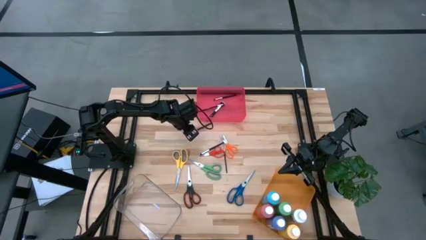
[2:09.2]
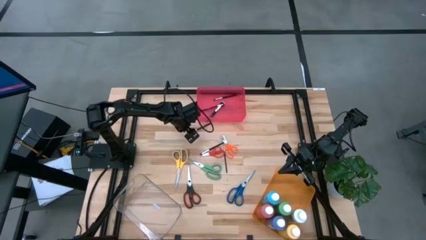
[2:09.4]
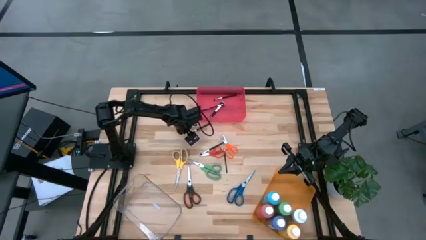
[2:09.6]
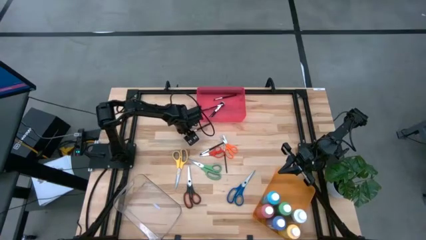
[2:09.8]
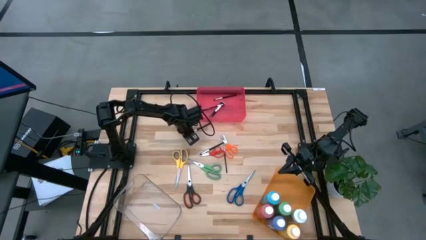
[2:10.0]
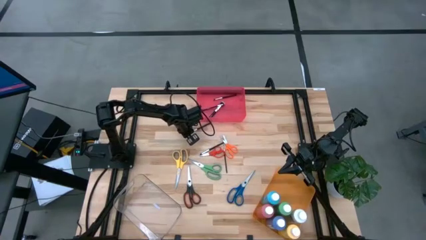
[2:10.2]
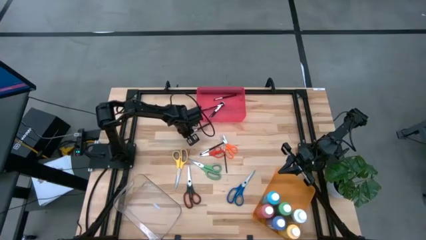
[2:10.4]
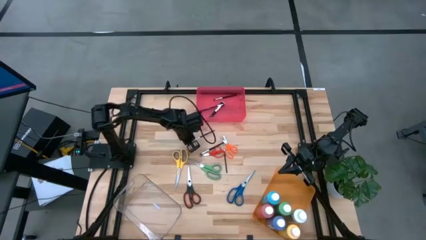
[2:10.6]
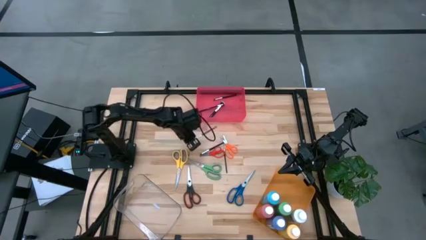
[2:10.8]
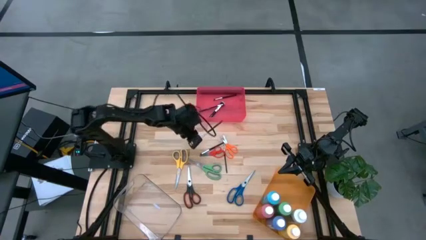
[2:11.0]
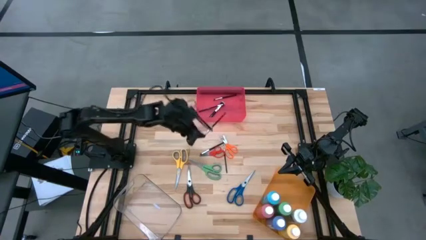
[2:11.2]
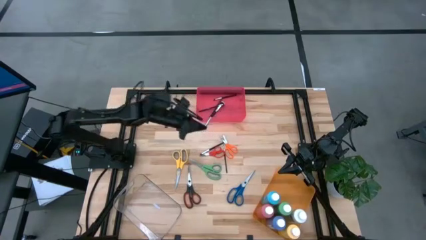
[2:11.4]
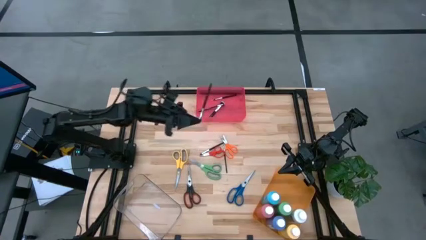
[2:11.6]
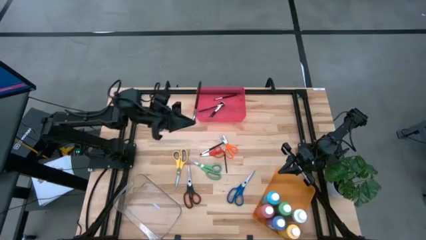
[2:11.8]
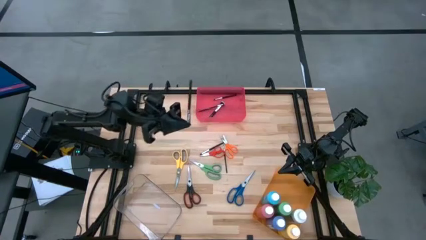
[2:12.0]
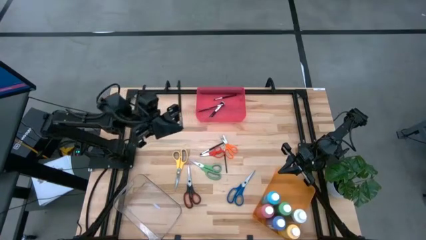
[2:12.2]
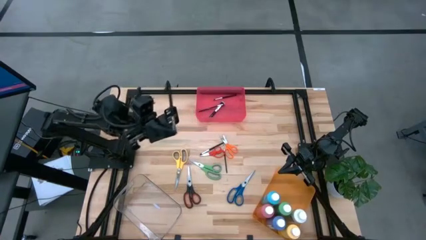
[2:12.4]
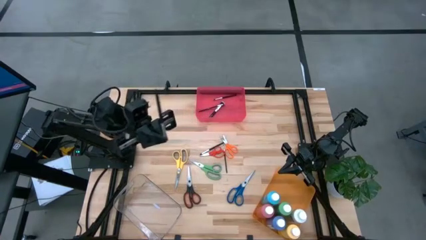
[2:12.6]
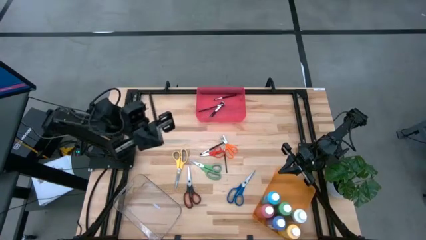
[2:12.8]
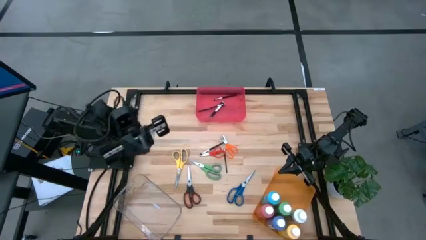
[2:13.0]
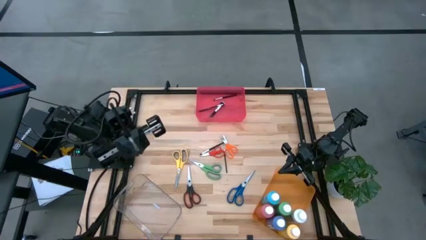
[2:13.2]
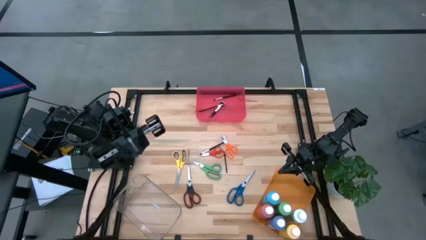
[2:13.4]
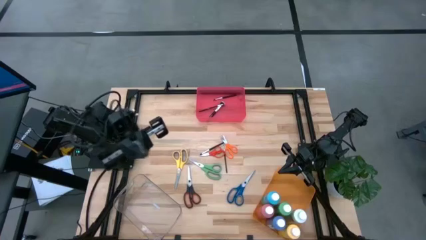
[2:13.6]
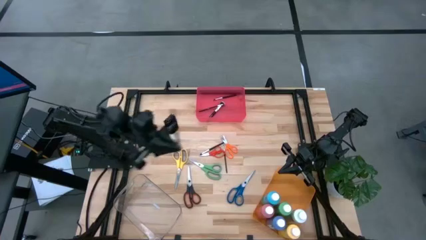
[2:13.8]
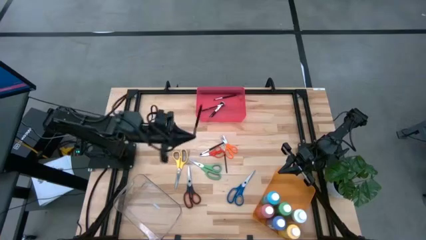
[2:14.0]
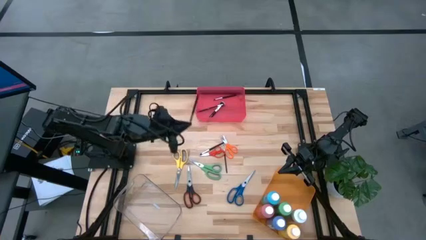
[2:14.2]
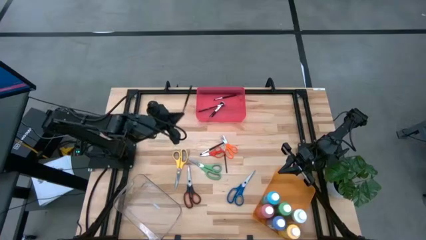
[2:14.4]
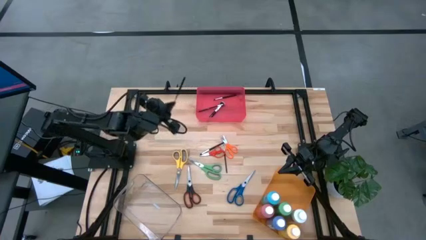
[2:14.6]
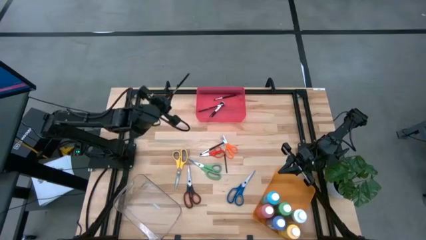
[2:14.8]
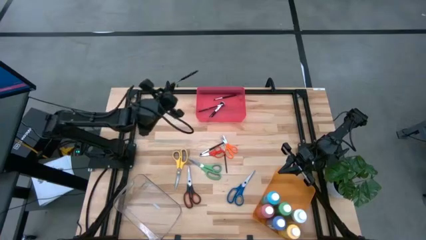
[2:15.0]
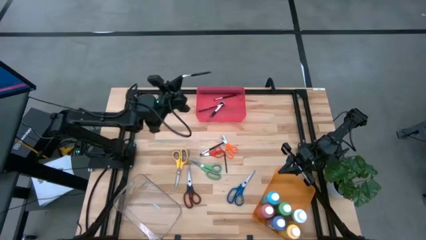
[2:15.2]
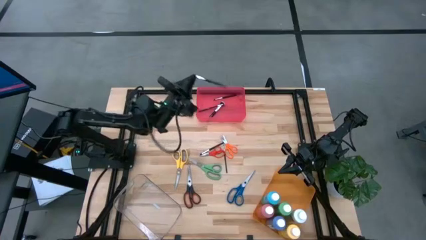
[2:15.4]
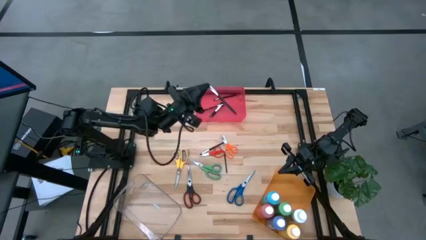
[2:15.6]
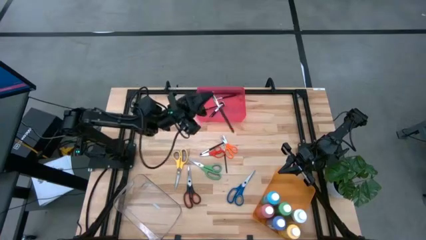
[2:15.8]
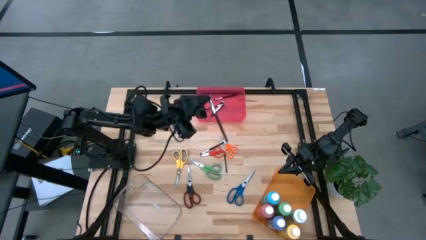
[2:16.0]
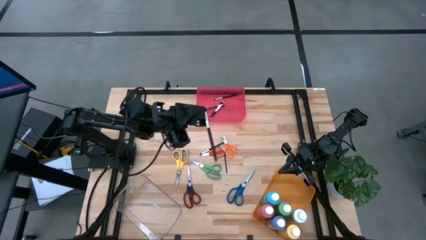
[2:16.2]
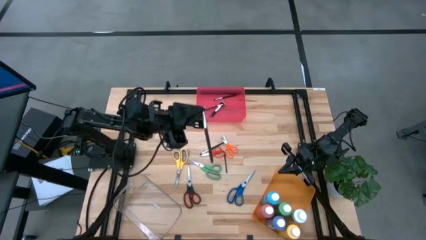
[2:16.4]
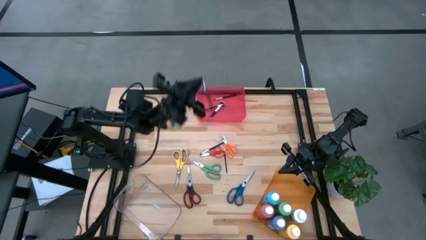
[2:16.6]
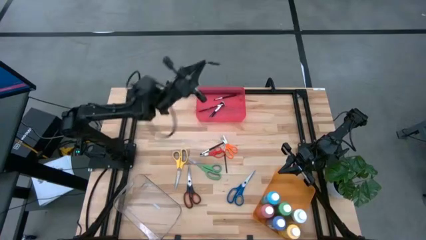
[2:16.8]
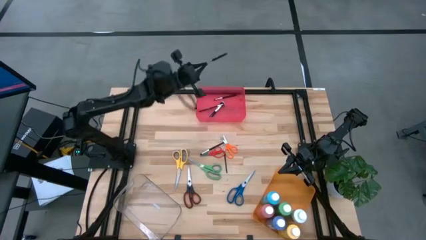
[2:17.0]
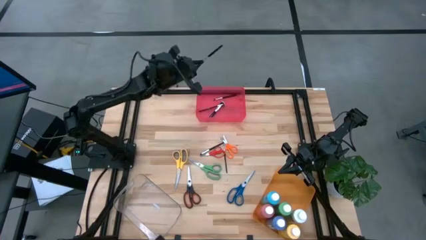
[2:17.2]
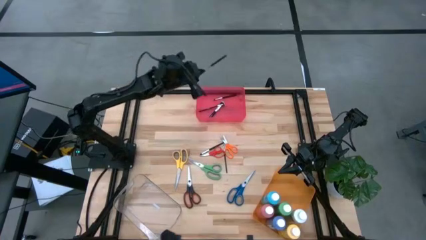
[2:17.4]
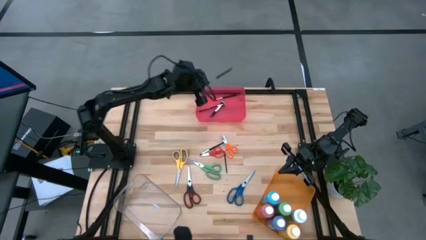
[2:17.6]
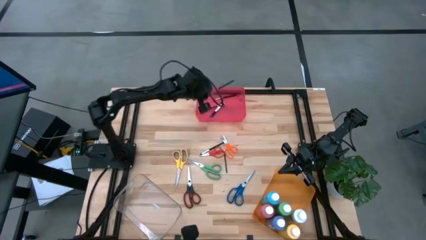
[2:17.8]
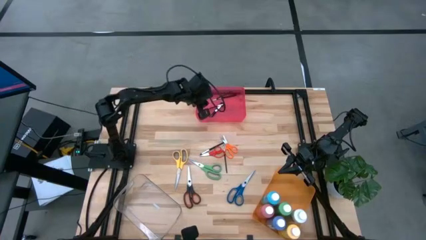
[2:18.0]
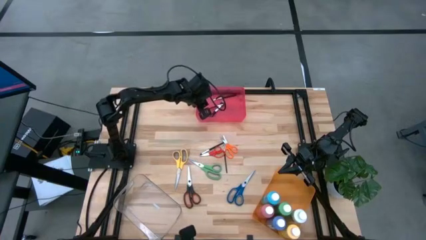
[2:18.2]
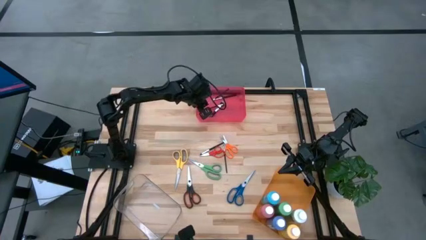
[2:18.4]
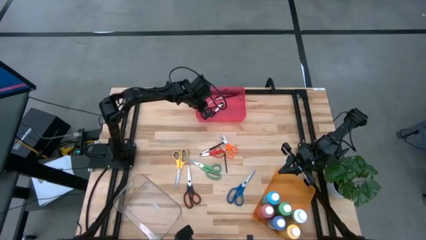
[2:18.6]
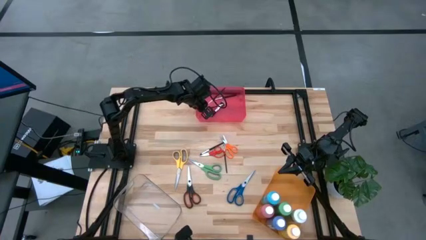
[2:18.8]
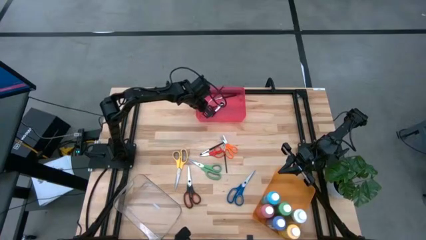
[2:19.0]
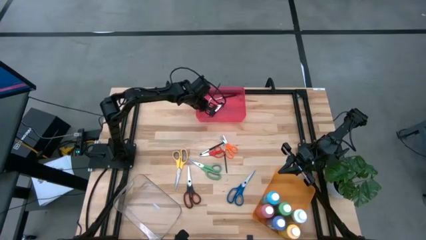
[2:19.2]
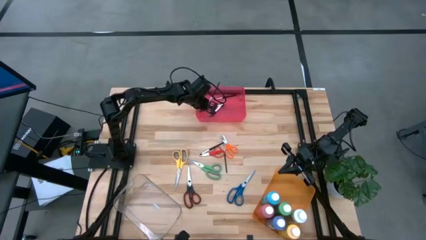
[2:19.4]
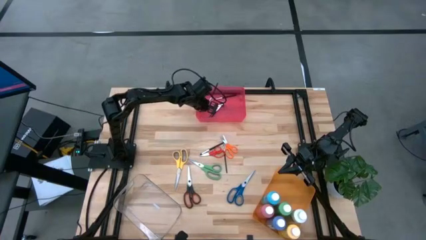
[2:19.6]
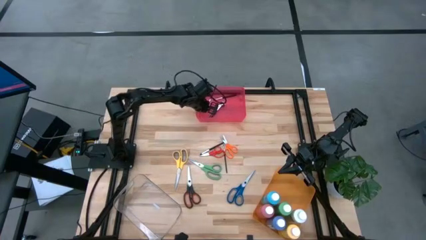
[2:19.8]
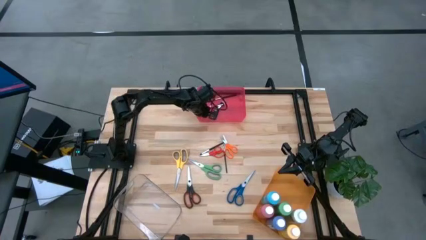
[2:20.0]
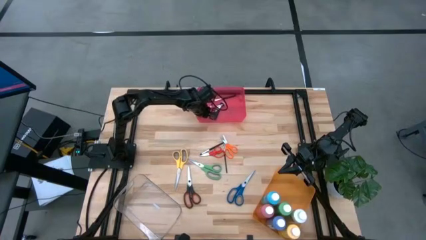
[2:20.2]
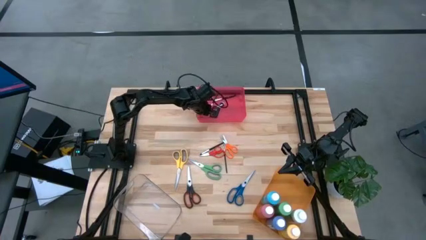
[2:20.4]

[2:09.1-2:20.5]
Task: Pick & Place Paint Supplies
Put the silver brush into the red bin

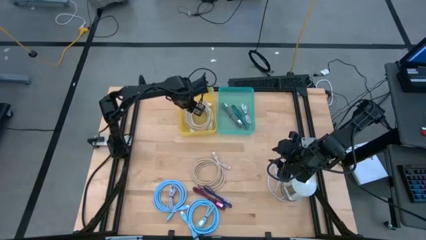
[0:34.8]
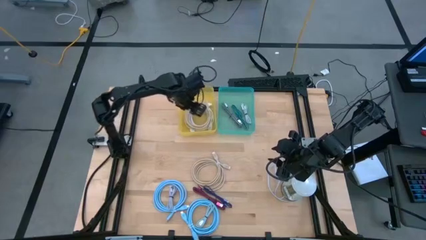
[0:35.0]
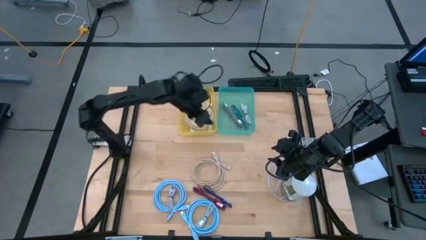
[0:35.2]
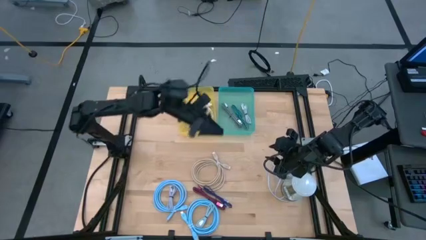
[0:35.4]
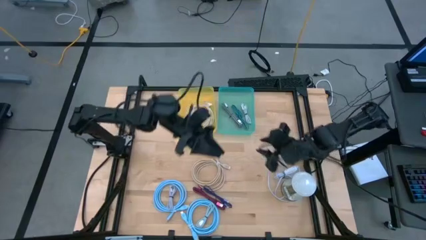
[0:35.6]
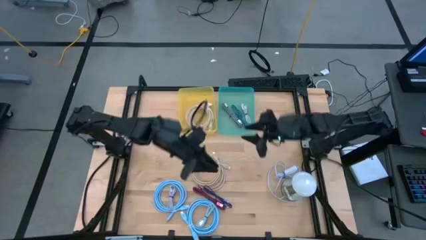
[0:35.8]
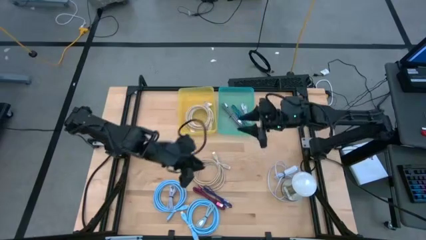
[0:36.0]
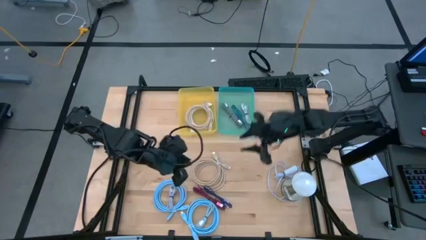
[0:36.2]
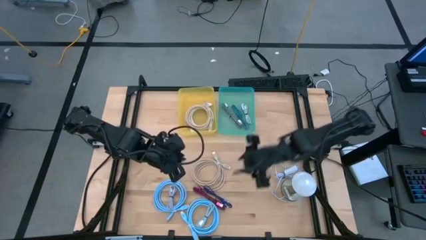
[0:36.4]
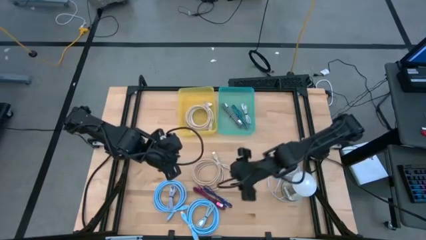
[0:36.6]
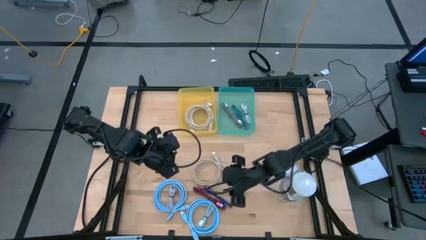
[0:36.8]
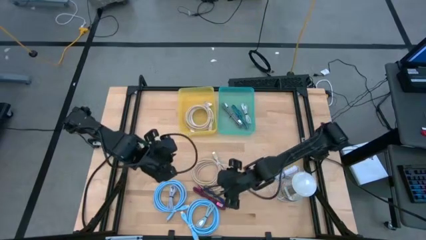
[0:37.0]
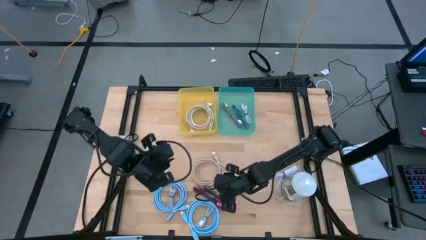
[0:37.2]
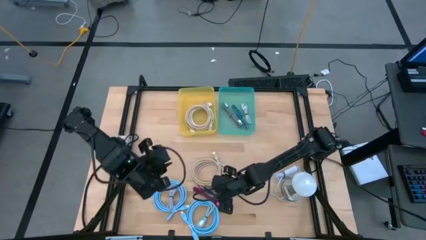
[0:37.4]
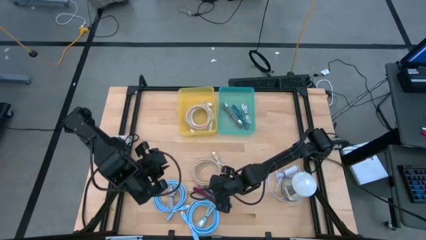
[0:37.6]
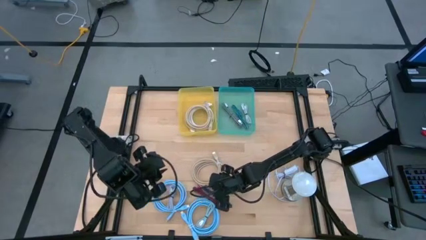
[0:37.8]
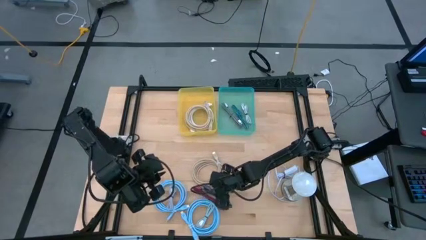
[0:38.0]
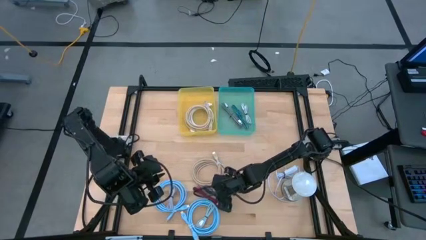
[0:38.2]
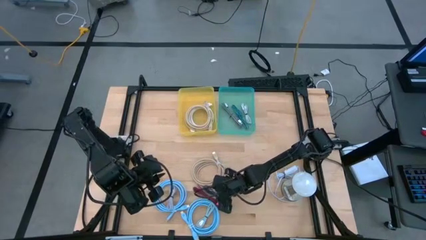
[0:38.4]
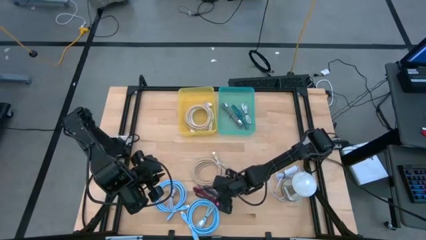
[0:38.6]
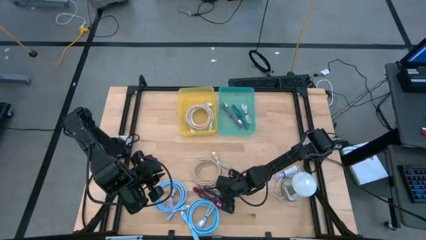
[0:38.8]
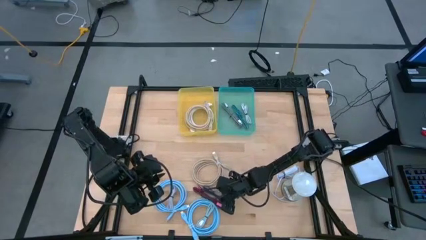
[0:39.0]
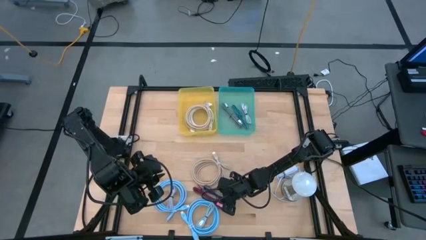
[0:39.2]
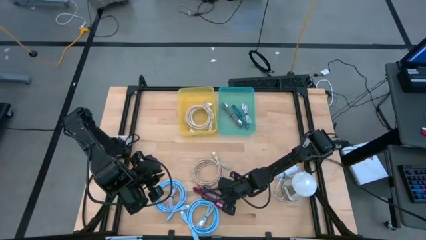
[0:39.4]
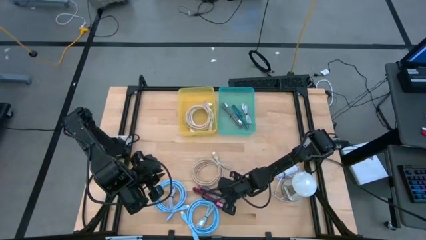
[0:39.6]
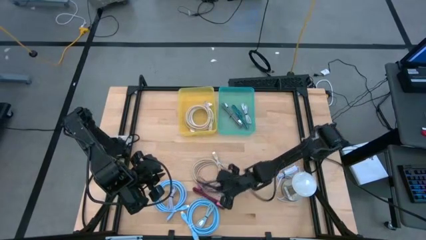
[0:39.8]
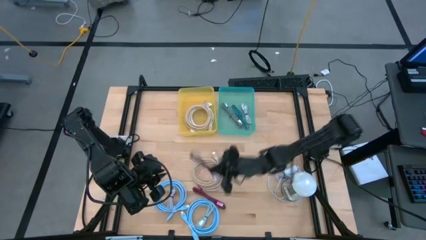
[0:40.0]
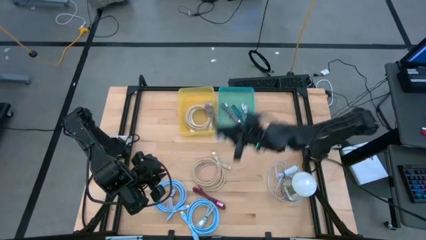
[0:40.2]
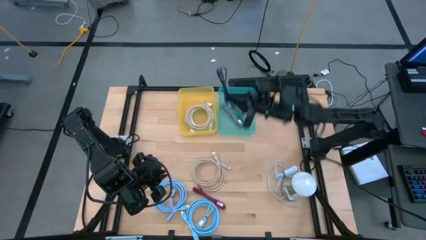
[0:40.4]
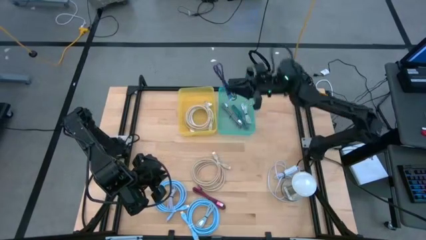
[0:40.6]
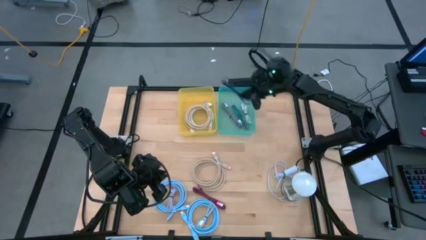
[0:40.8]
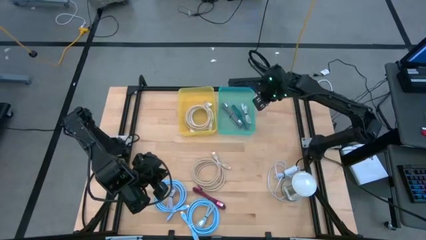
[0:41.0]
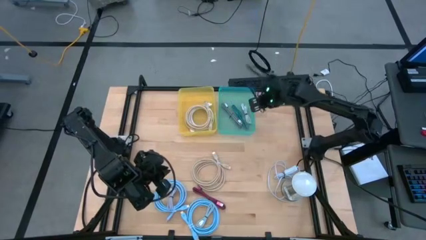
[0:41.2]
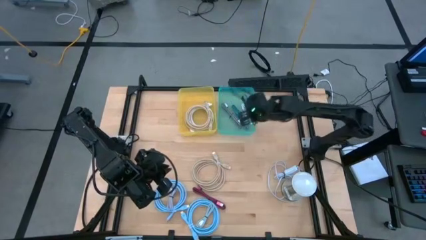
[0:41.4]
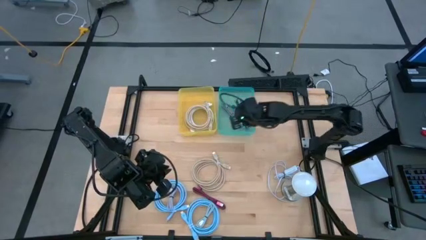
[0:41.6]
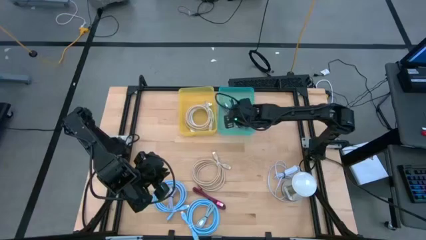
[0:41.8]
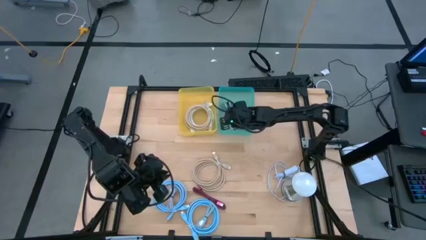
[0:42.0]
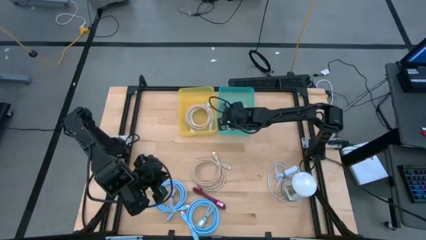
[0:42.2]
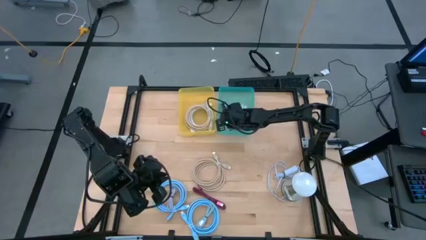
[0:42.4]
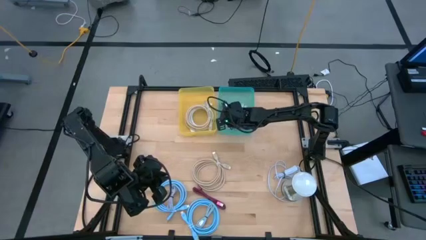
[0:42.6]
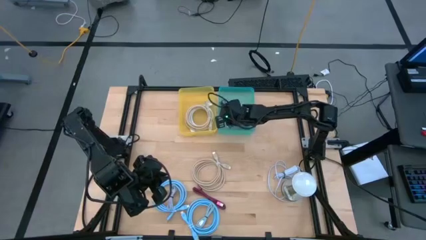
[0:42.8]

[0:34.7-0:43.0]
Task: Pick and place USB-C Cables
Put the small black and violet charger cable into the green bin
